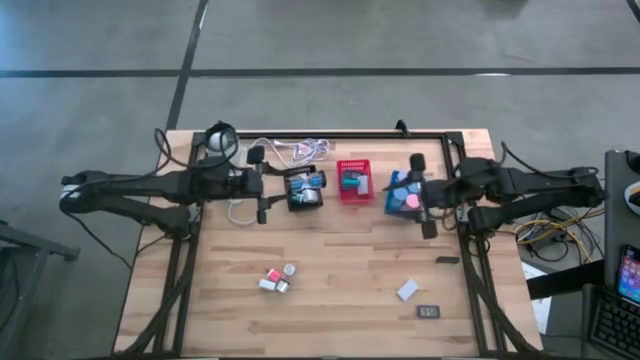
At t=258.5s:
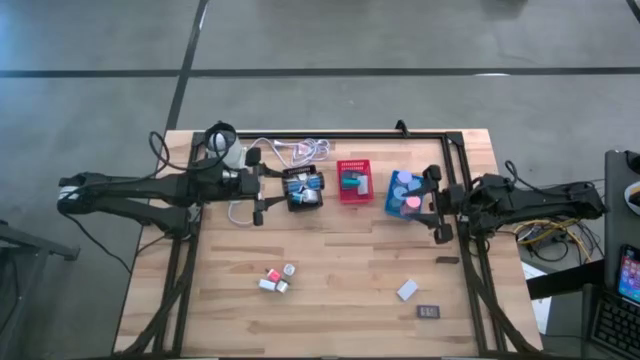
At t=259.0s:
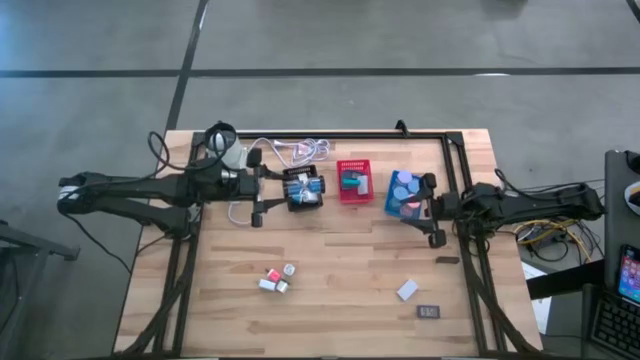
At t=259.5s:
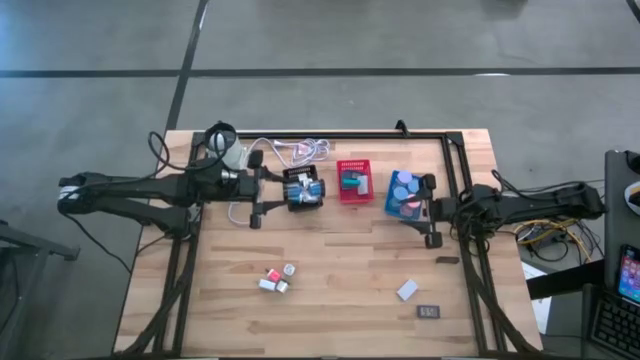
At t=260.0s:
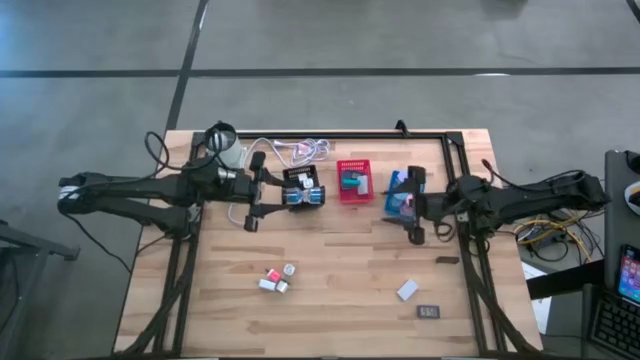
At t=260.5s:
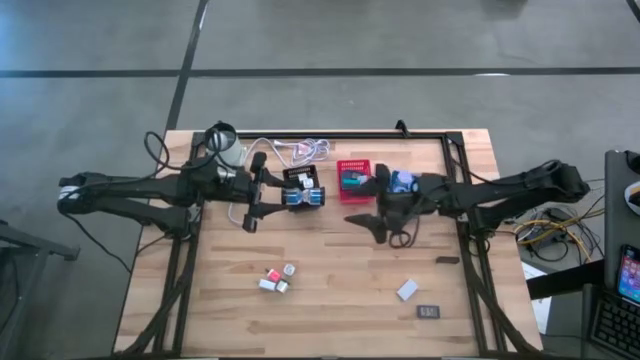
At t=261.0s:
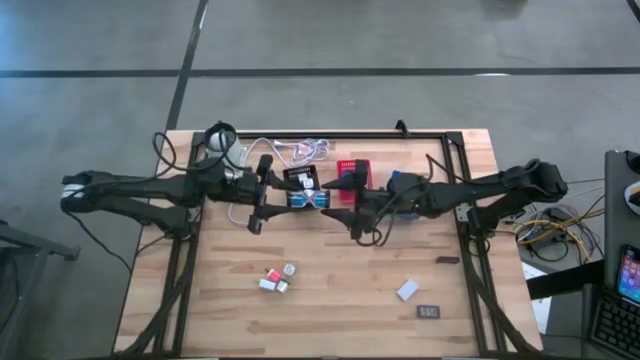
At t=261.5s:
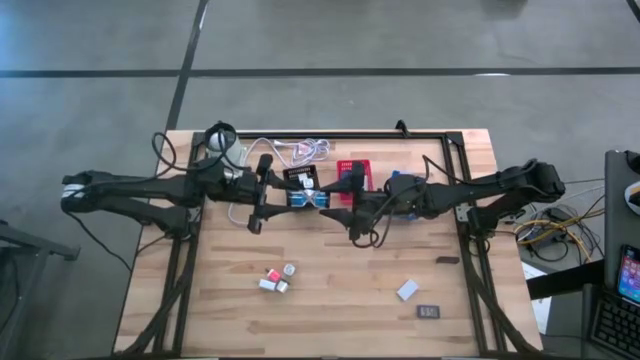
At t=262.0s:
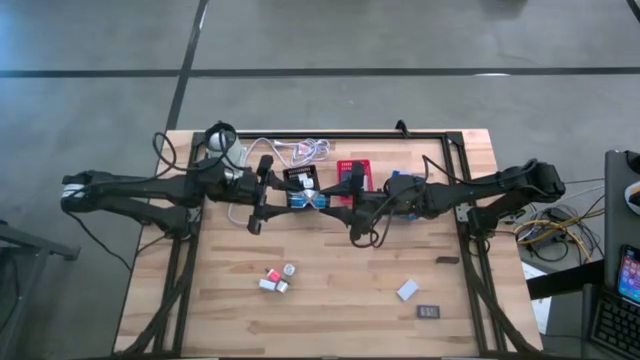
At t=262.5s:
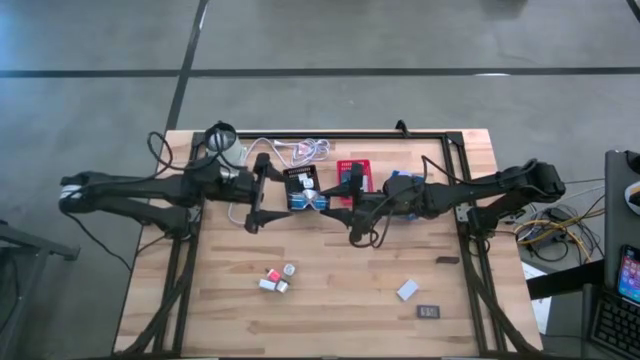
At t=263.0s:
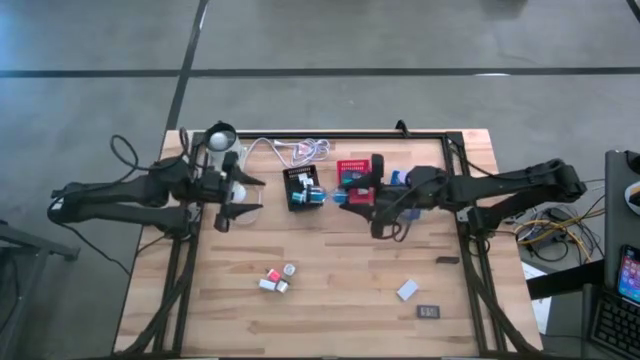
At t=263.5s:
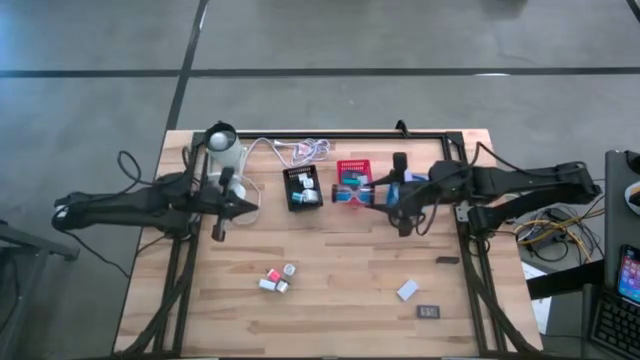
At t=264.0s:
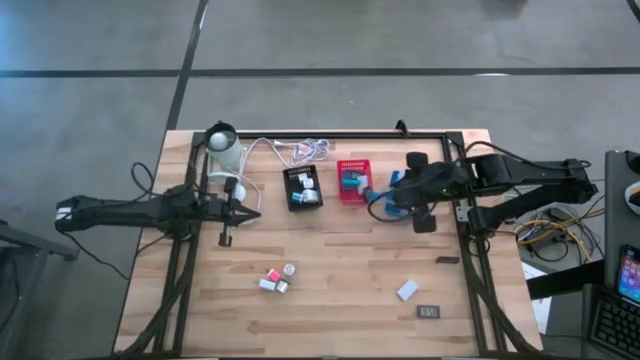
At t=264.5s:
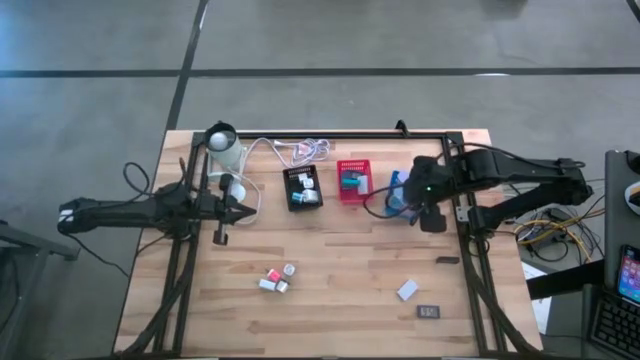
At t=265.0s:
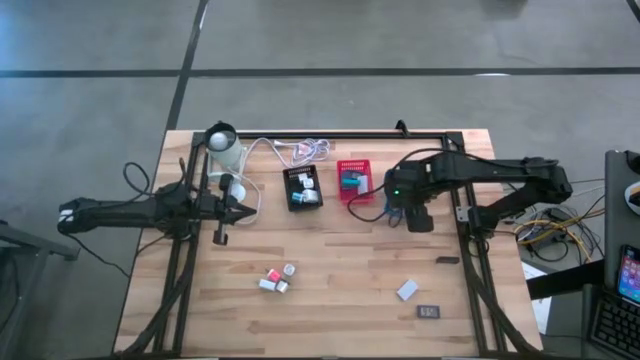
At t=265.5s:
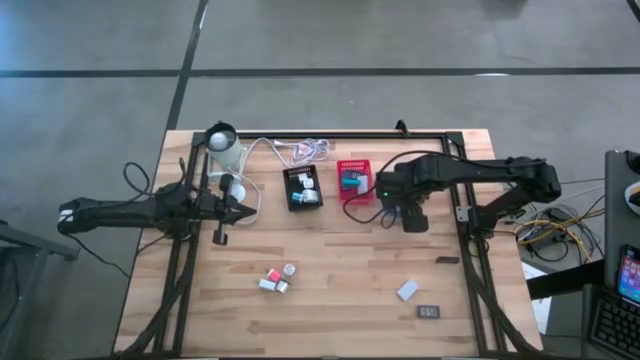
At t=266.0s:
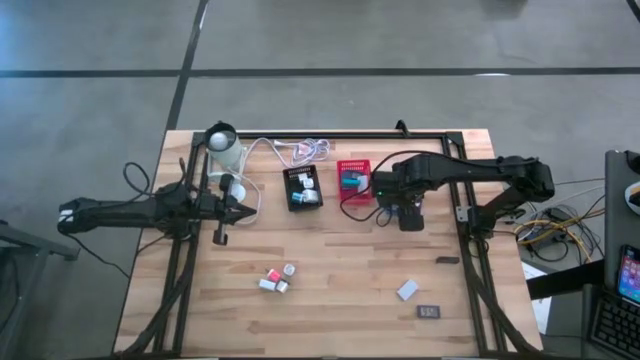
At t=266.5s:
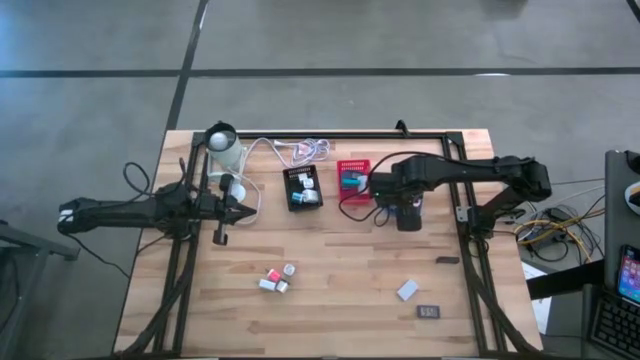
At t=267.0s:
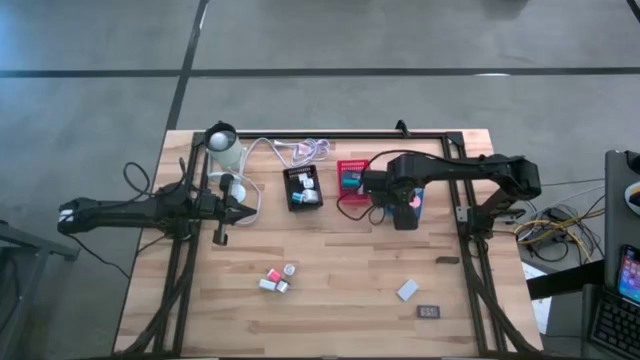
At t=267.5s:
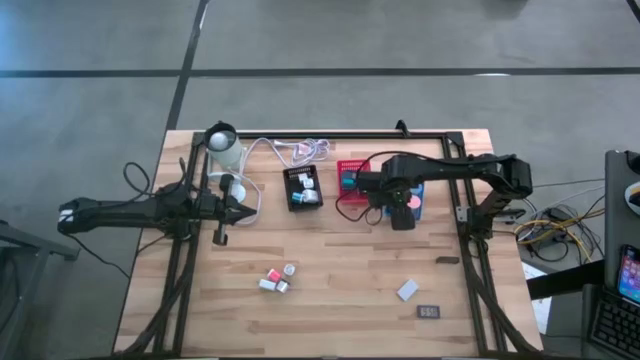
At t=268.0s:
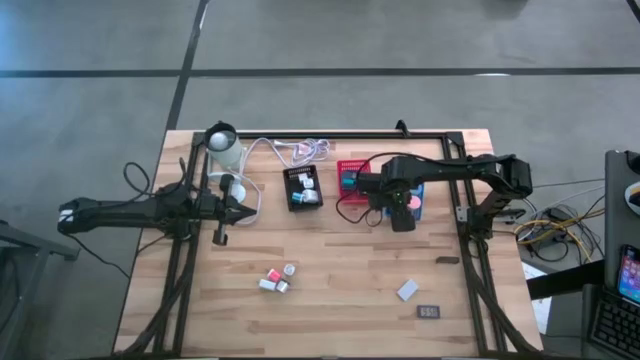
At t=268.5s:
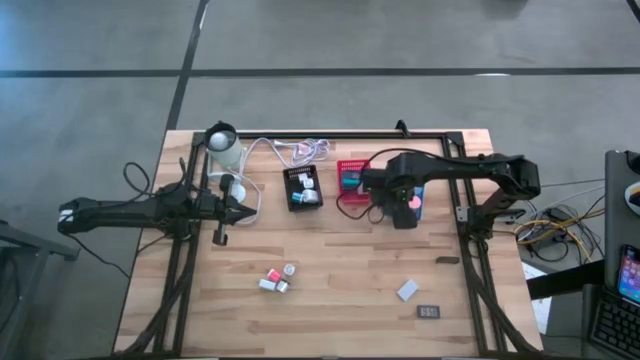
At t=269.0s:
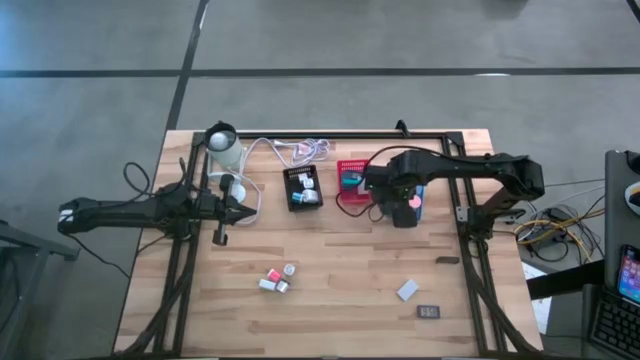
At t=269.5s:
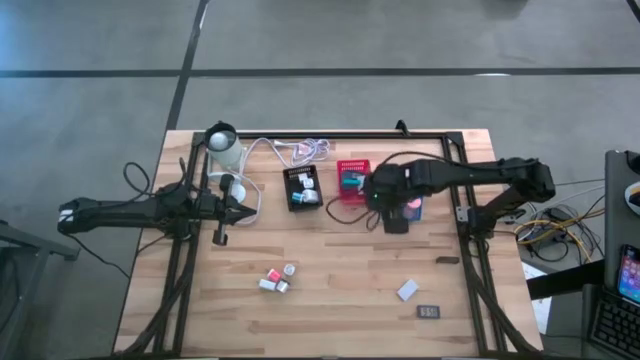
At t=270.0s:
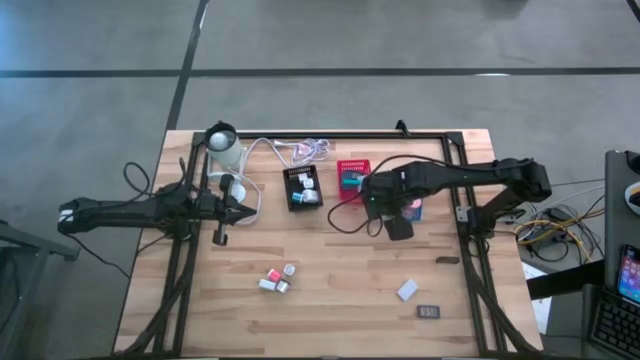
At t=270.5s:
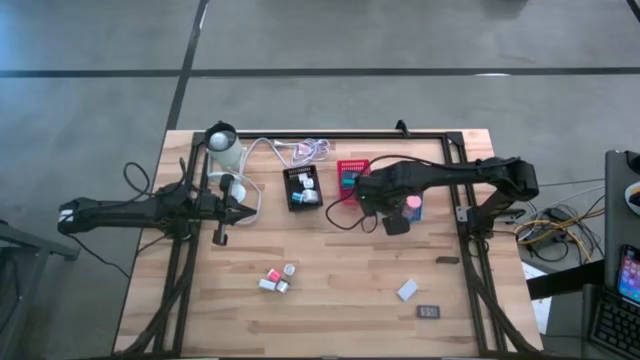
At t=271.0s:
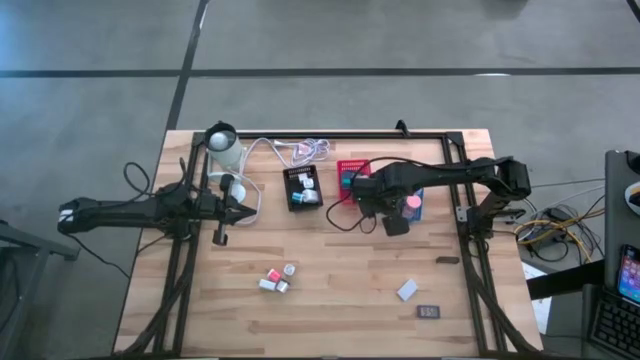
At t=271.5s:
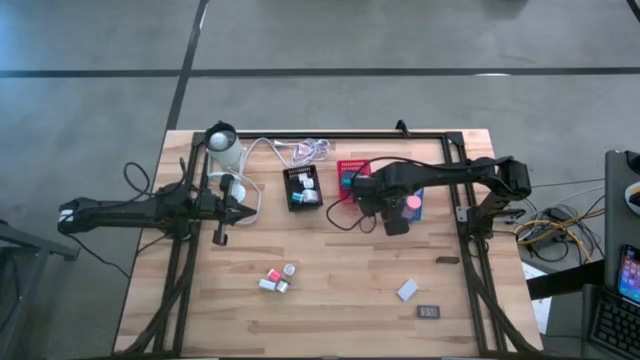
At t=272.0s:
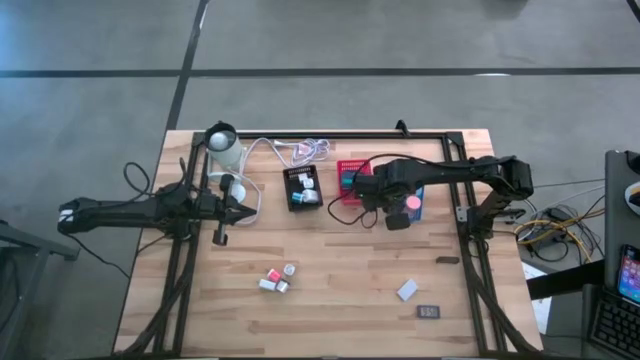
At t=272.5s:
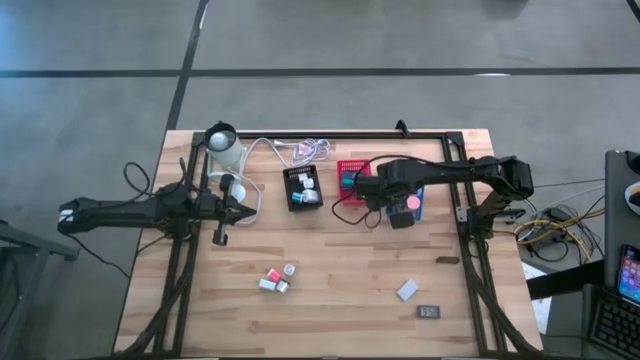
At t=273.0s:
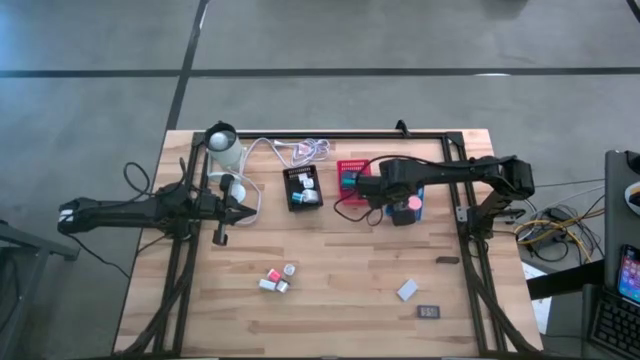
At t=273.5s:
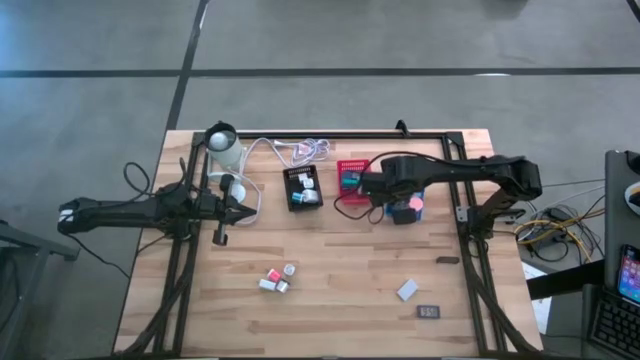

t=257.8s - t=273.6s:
Task: Pick & Place Office items
Put the blue hourglass into the blue bin

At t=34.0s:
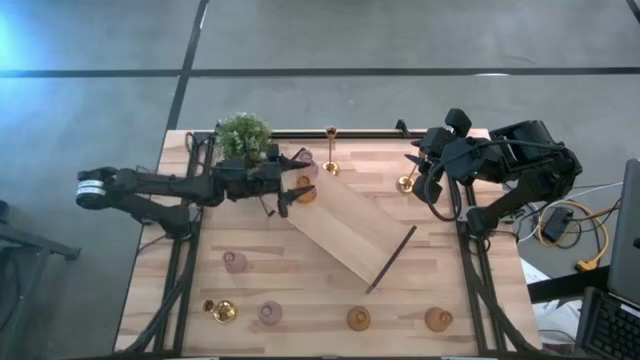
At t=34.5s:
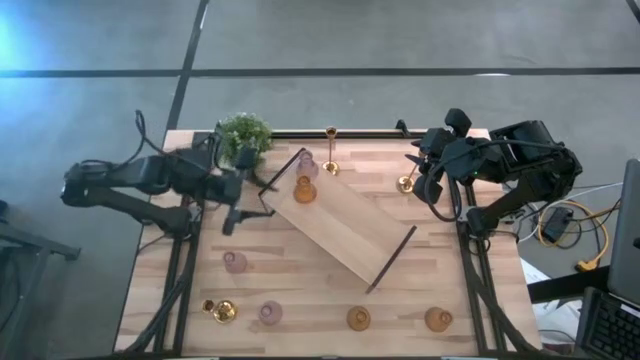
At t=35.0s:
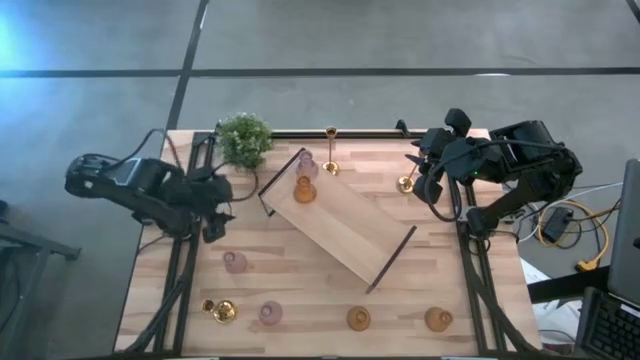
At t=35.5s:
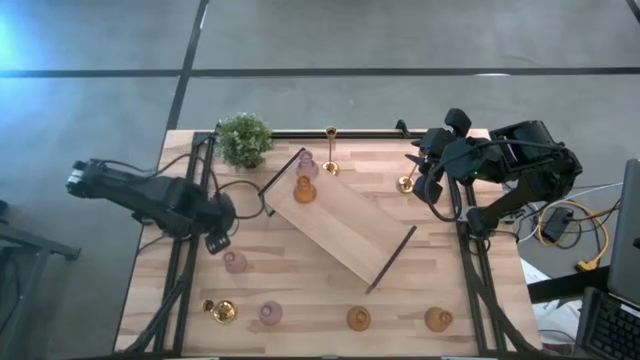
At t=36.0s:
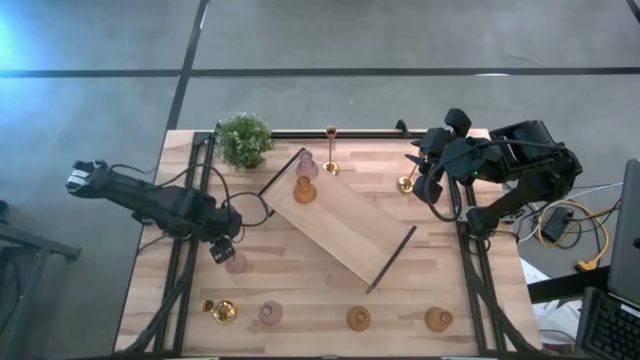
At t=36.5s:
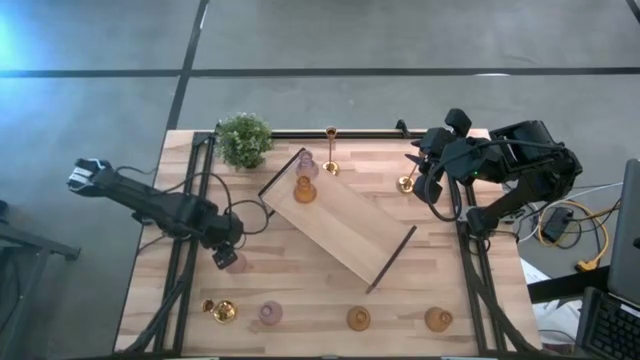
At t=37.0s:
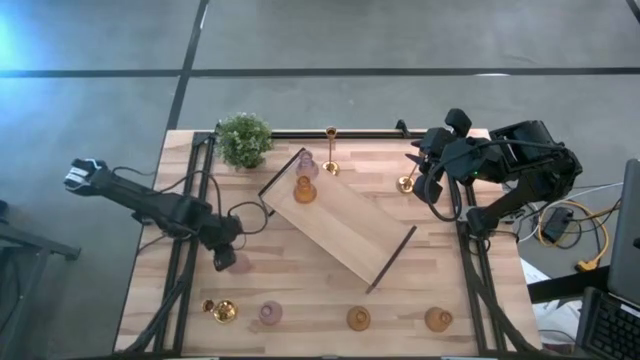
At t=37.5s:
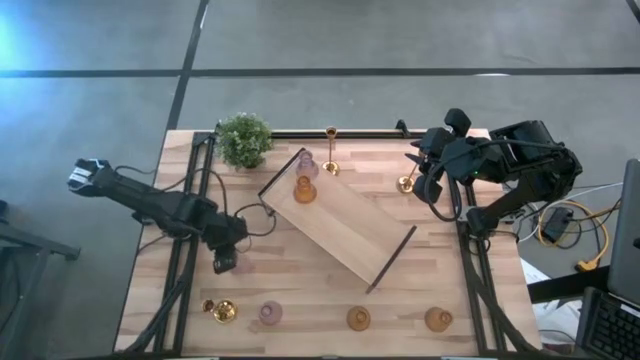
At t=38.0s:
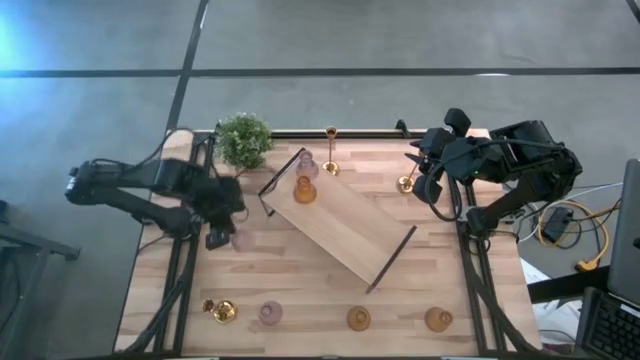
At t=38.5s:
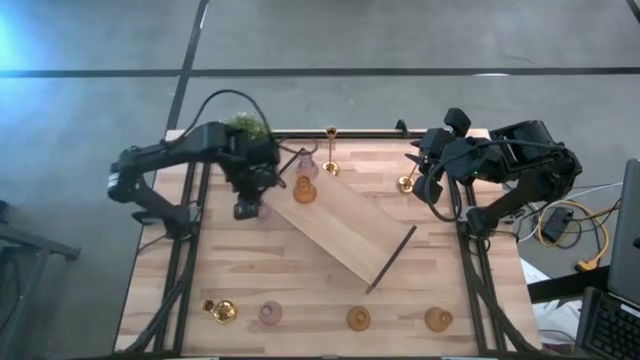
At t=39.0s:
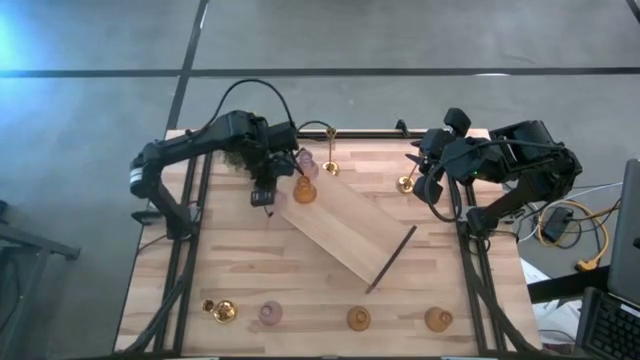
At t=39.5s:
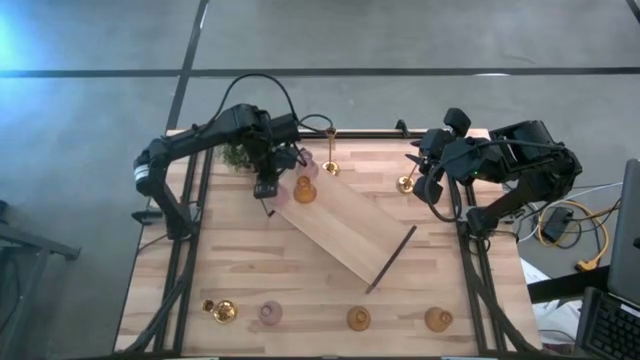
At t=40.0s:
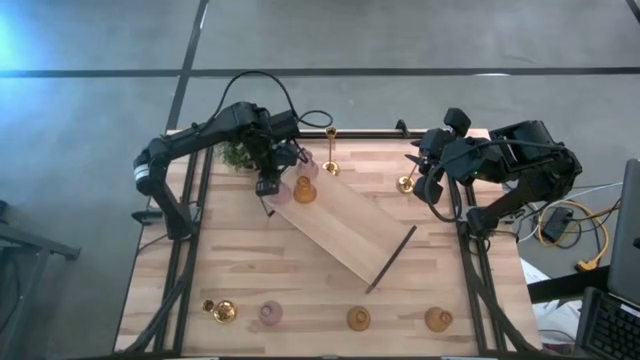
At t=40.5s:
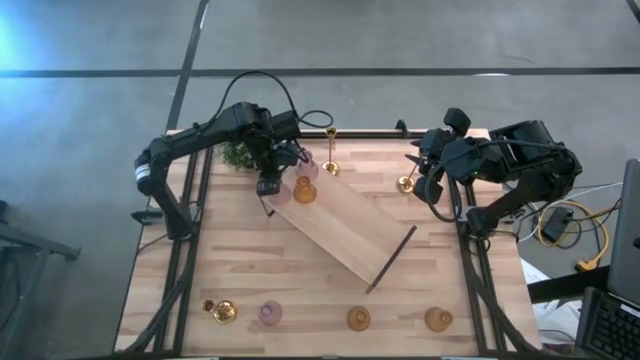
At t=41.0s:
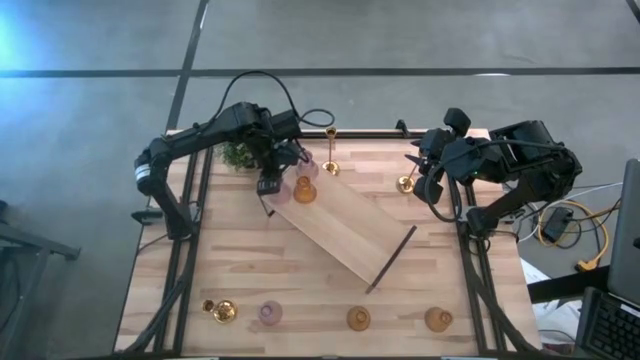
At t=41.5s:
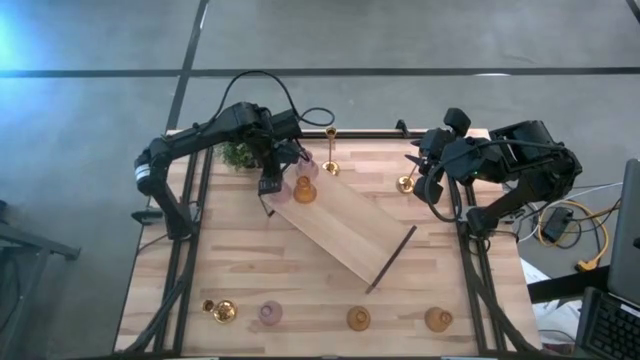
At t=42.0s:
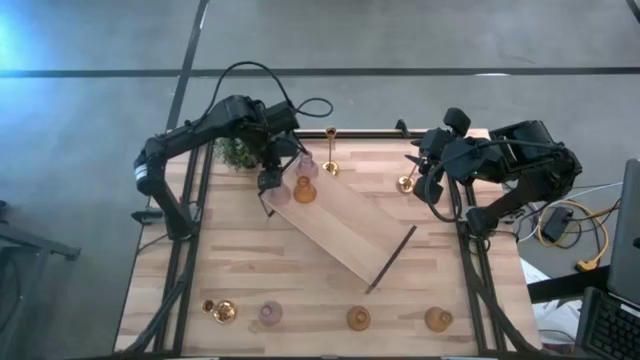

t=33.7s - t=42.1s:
Task: Pick & Place candle stick holders
Put the top pink candle holder on the shelf
